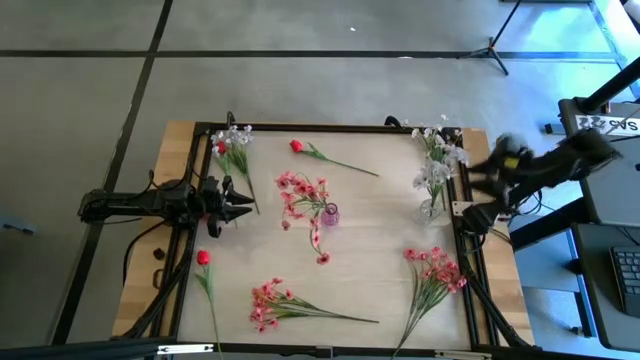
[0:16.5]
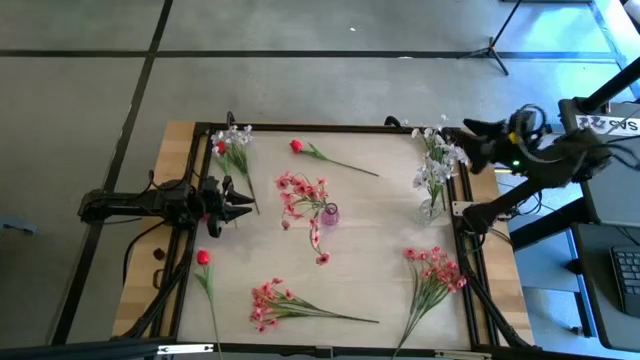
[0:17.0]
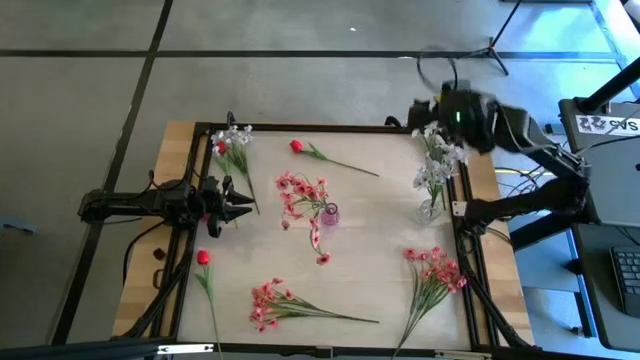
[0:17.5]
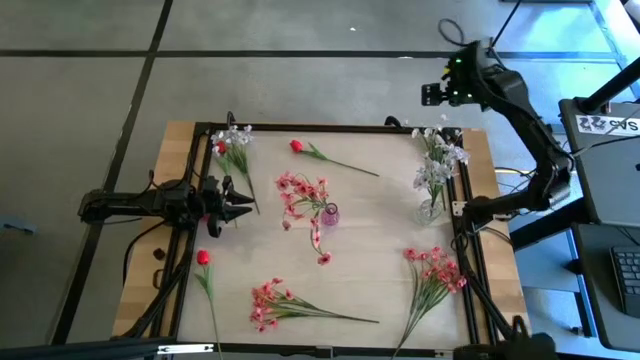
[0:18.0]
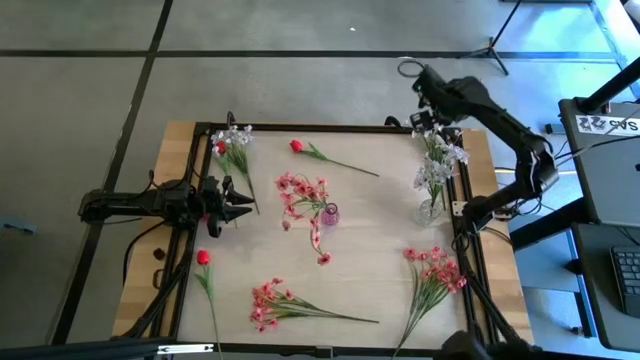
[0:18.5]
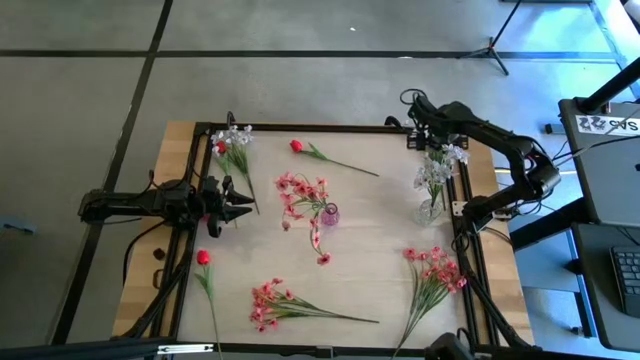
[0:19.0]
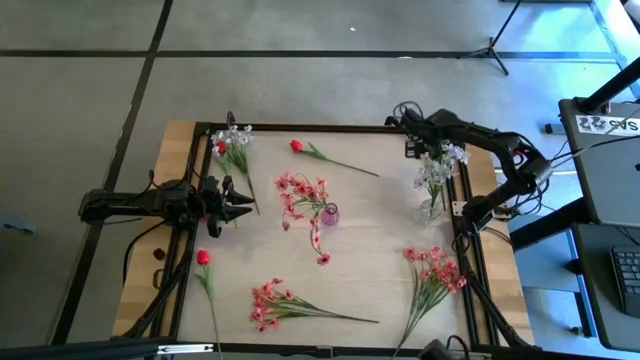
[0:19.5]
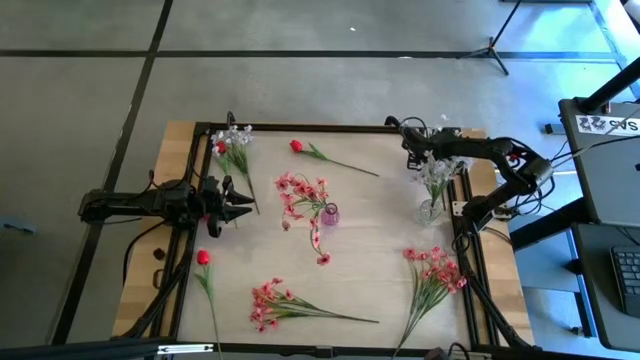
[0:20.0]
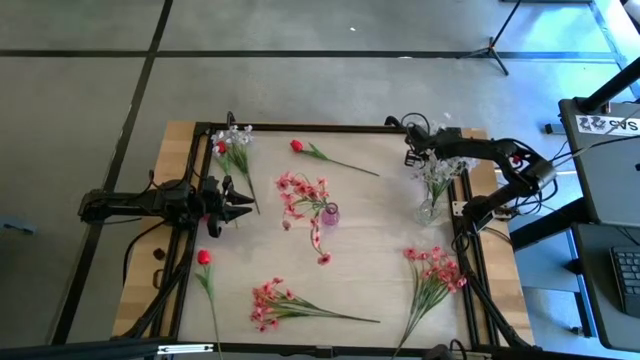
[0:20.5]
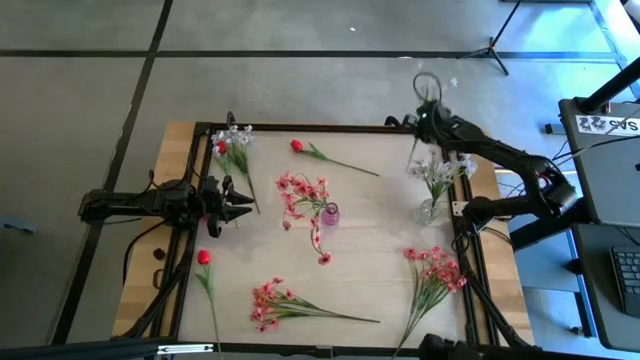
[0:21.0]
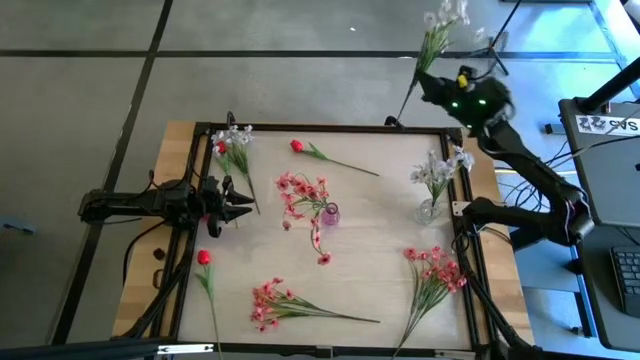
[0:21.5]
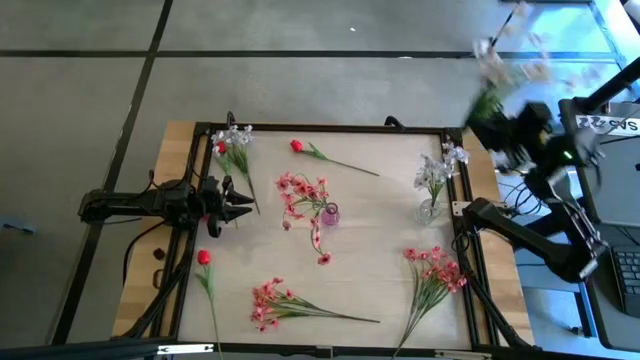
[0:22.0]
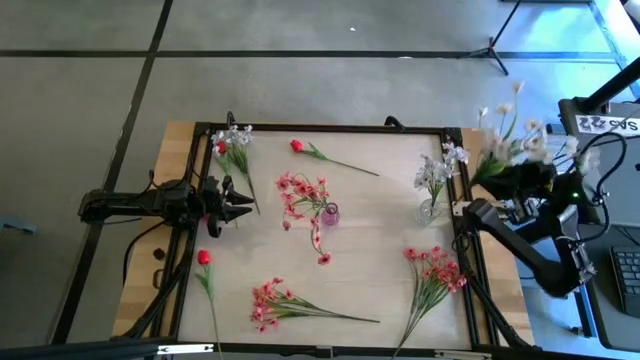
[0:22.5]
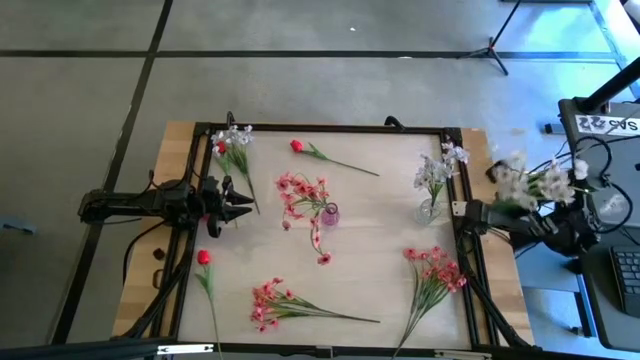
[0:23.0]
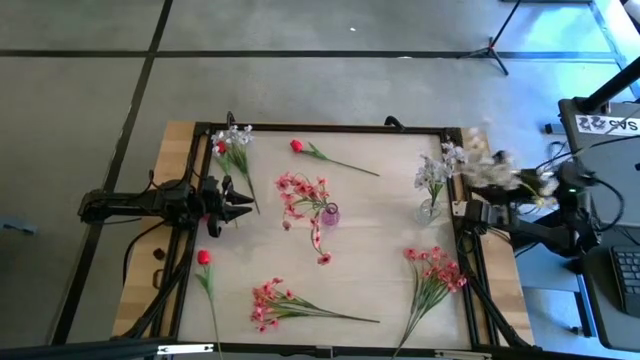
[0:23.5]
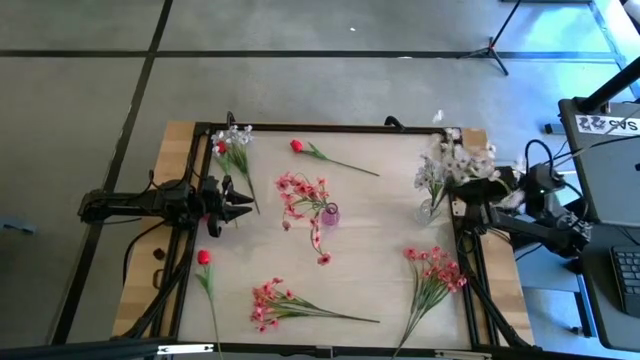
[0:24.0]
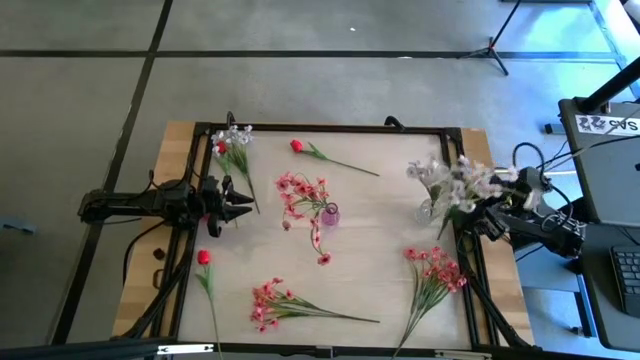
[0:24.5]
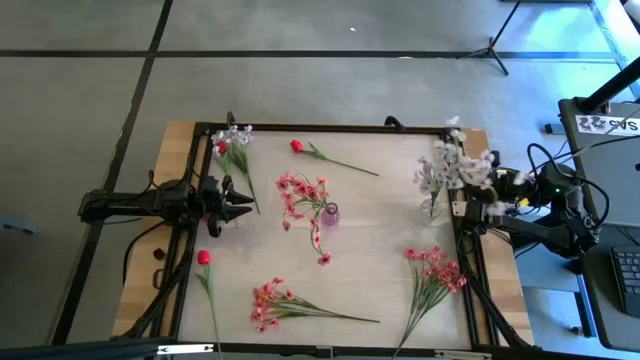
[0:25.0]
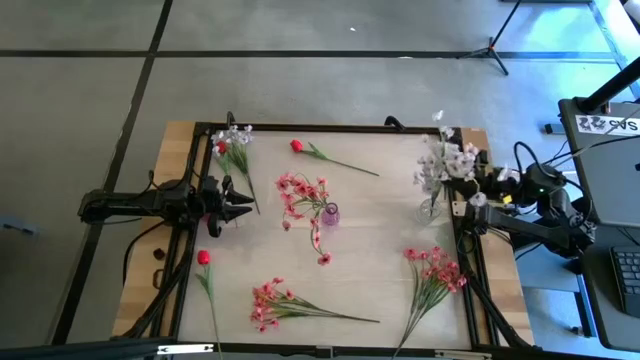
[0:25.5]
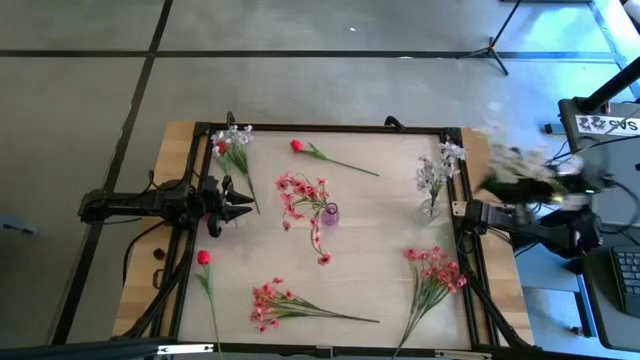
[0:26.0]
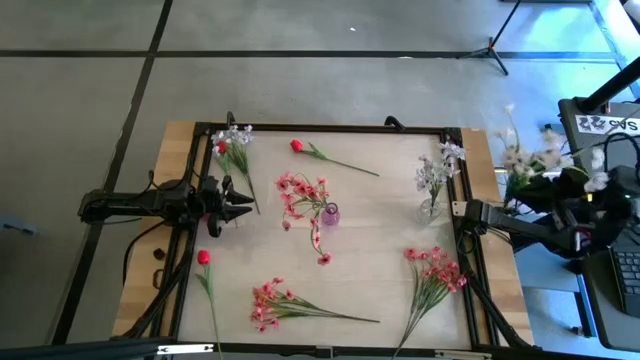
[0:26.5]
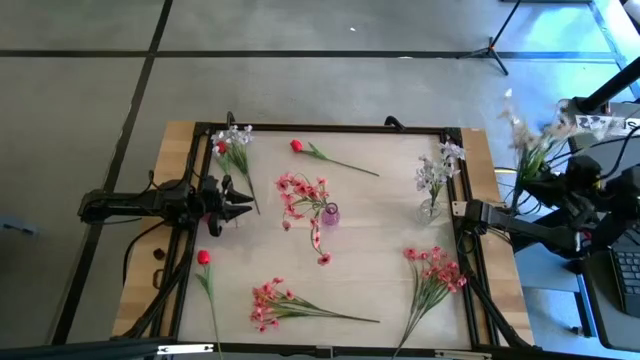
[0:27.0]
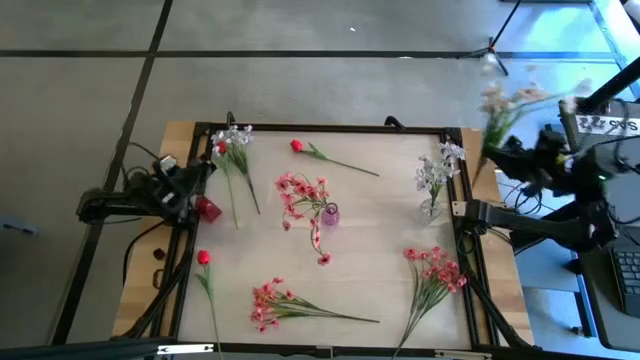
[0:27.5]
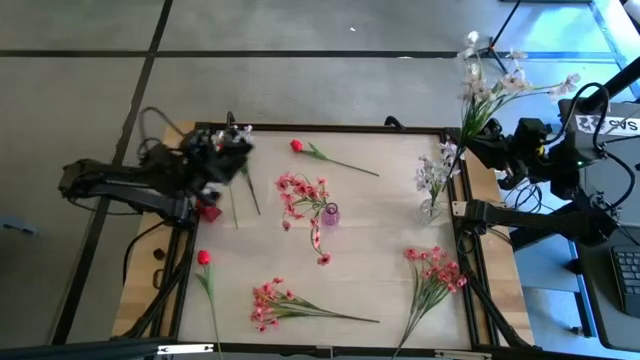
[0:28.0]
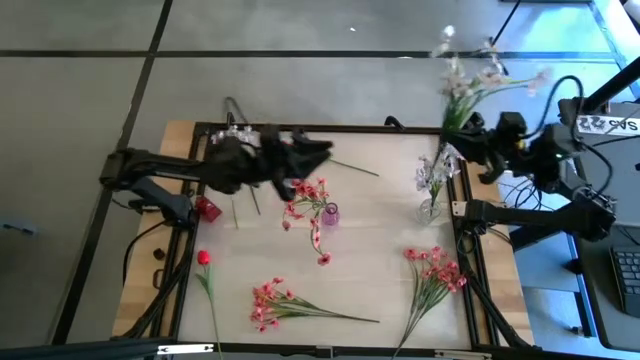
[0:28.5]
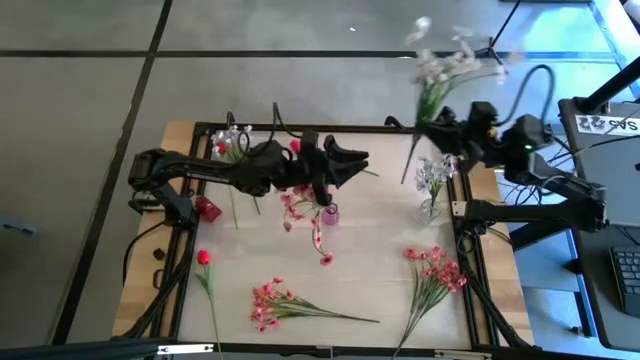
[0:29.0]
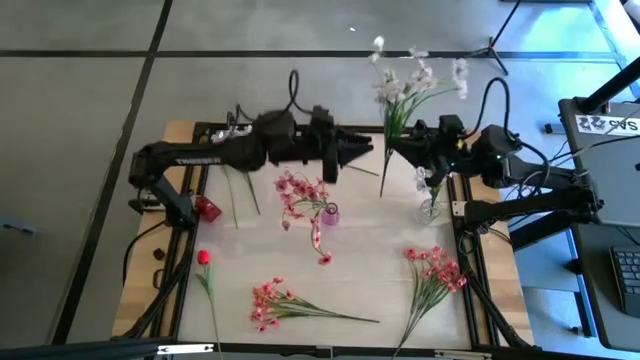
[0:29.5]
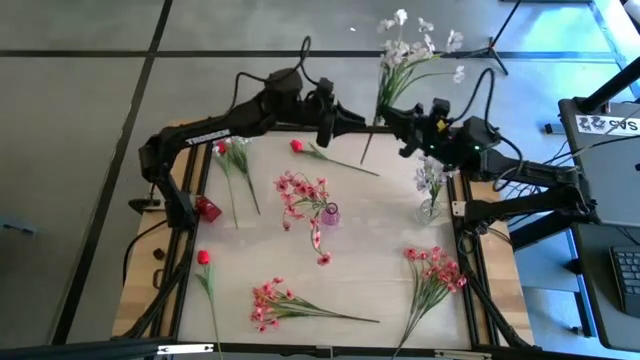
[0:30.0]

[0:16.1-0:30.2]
Task: Sort flowers into vase by color
Put the right white flowers into the transparent vase

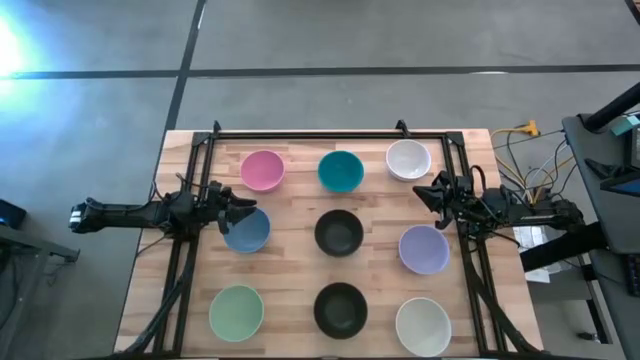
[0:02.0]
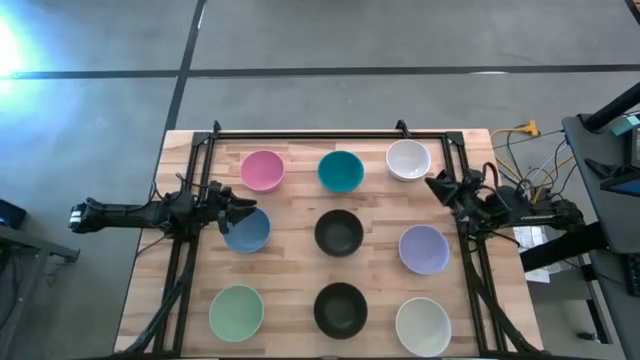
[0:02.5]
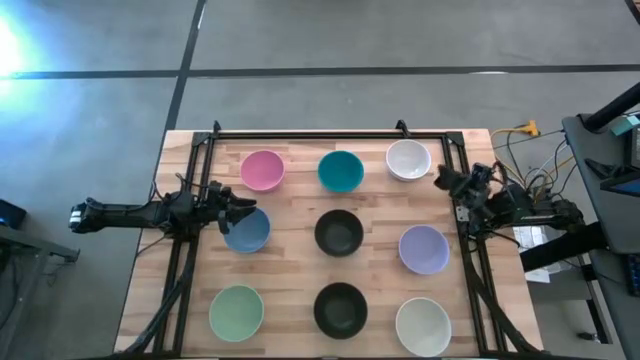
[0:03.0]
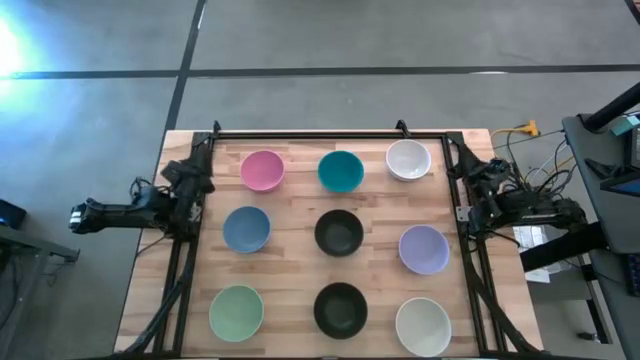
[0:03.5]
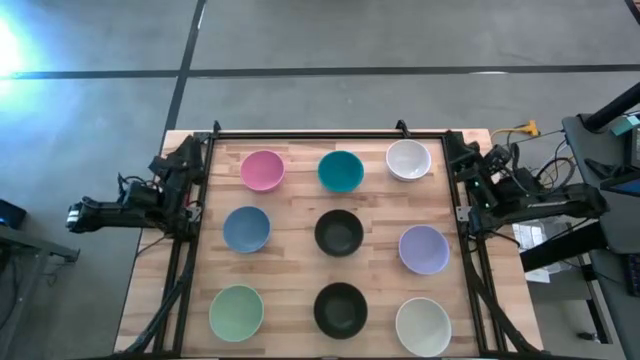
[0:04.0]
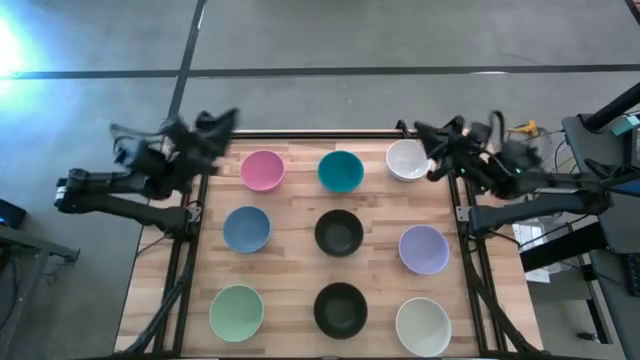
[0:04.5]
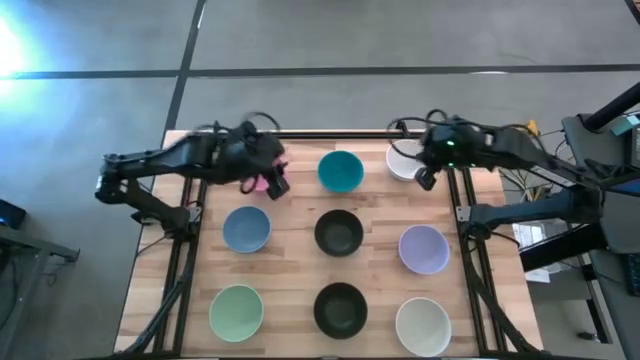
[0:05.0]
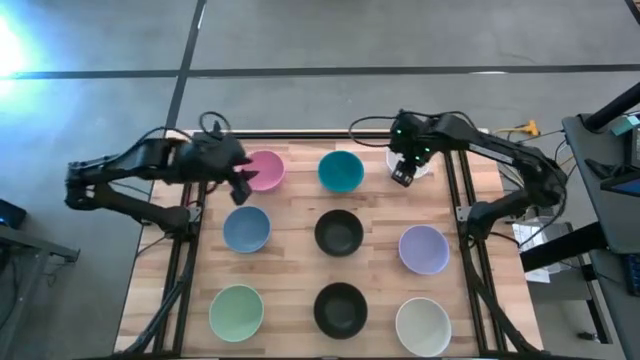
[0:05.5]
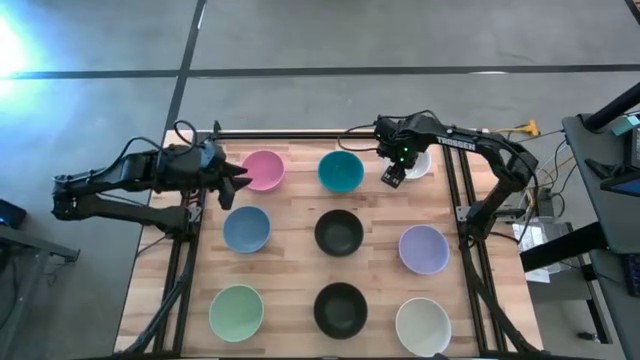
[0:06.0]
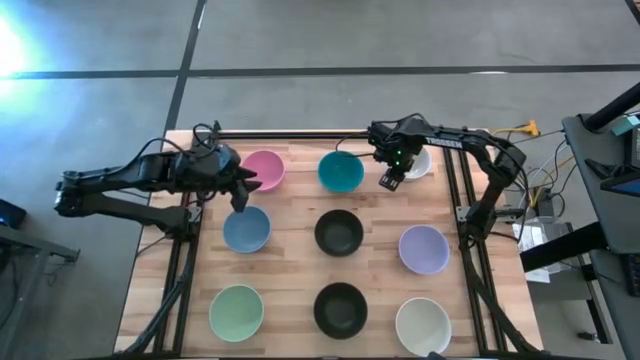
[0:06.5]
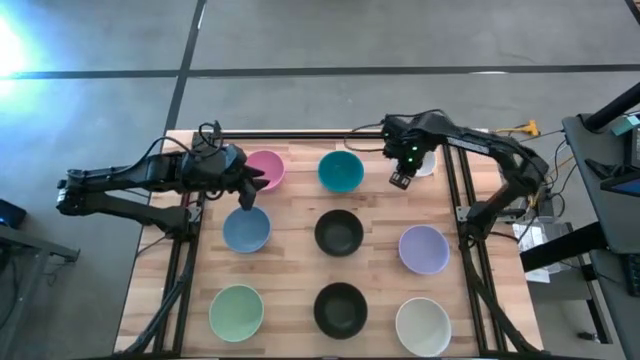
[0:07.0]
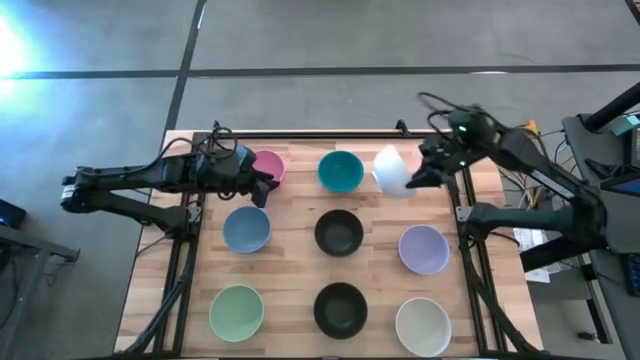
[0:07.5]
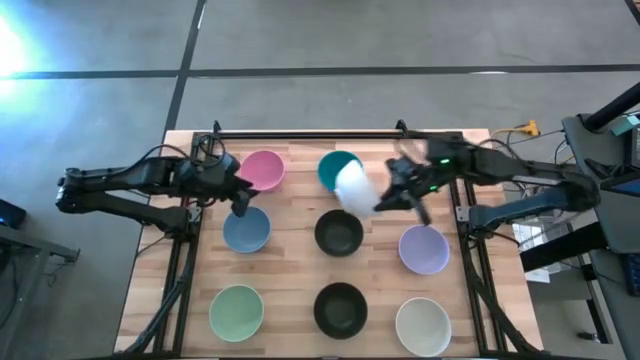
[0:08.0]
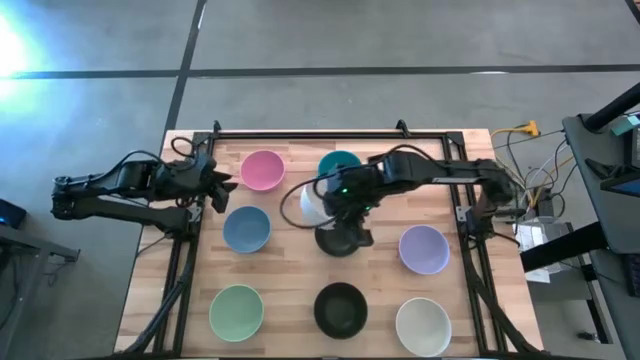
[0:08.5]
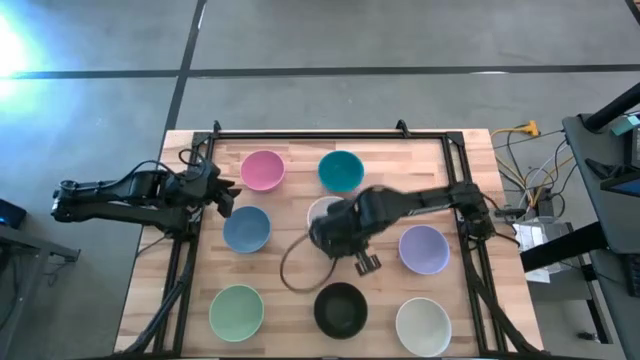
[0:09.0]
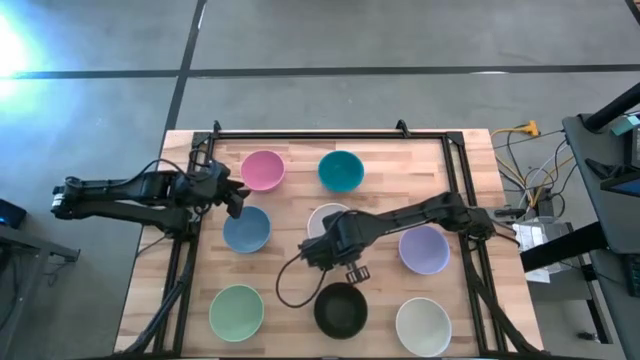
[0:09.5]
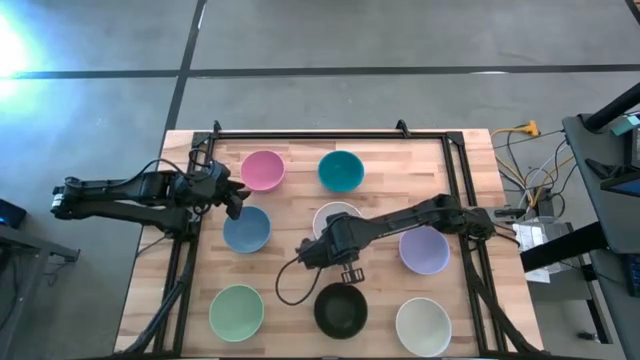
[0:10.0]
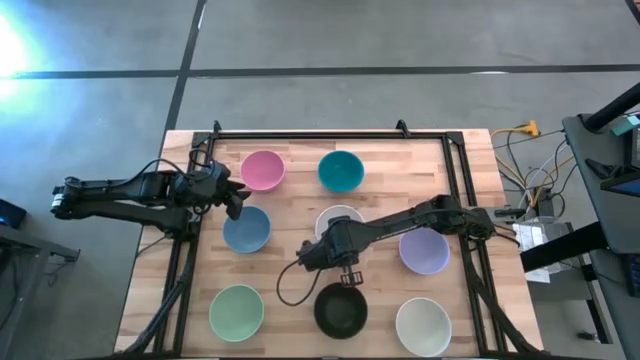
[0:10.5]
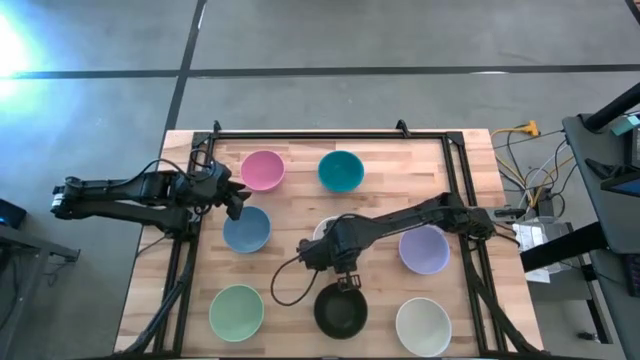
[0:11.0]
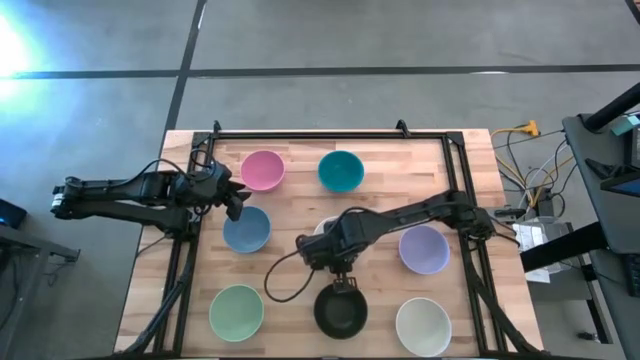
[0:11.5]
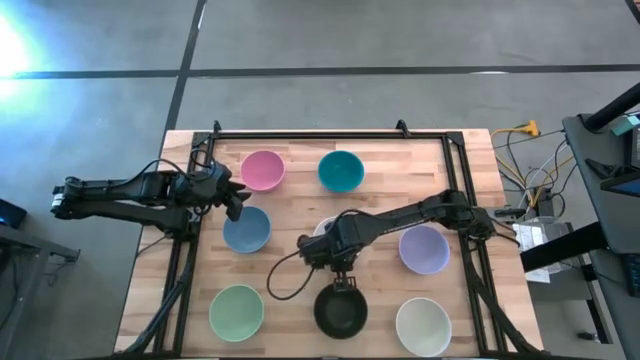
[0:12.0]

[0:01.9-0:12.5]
Task: Nest bowls inside each other
Stack the top white bowl on the top black bowl
